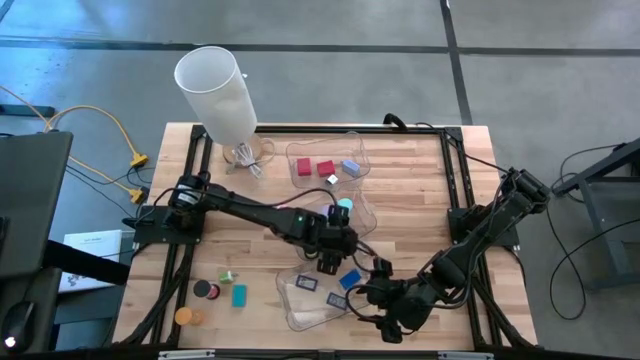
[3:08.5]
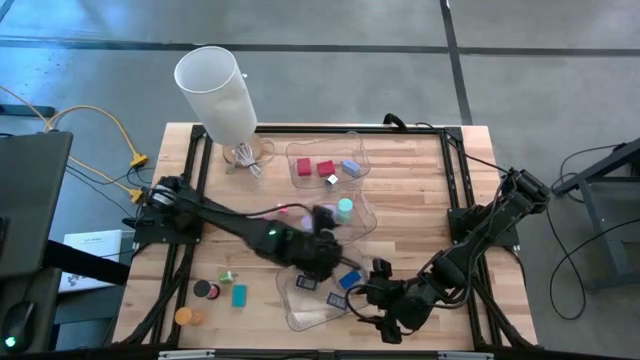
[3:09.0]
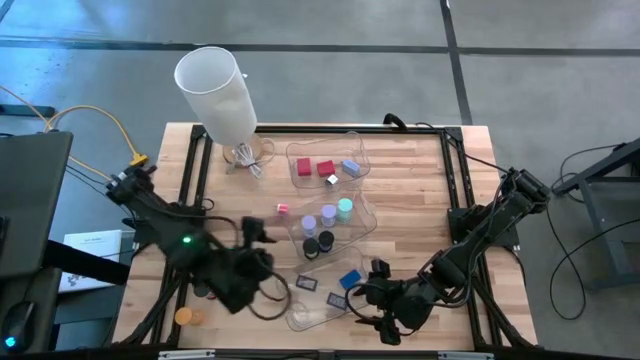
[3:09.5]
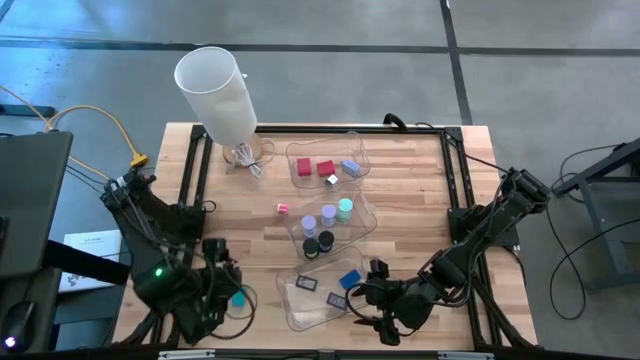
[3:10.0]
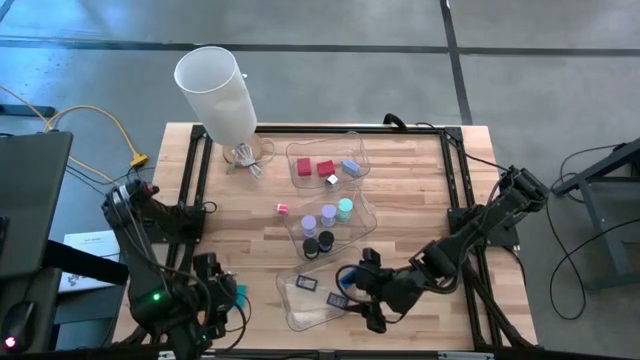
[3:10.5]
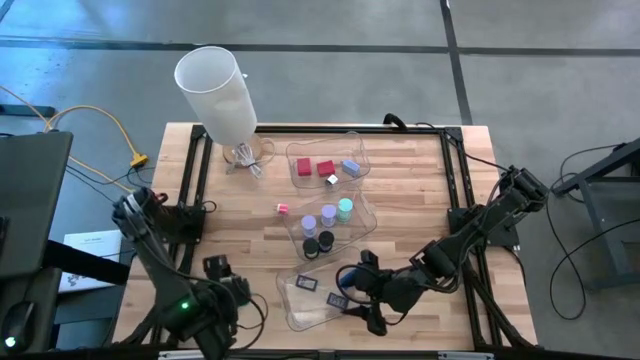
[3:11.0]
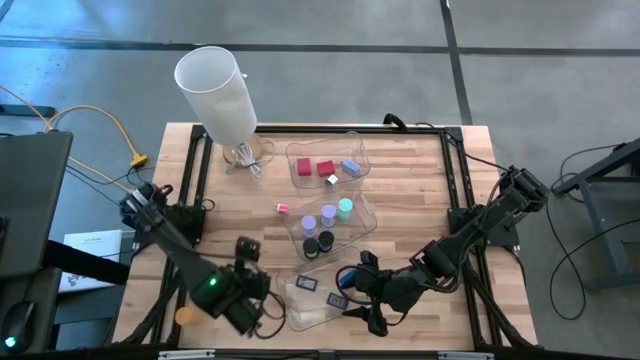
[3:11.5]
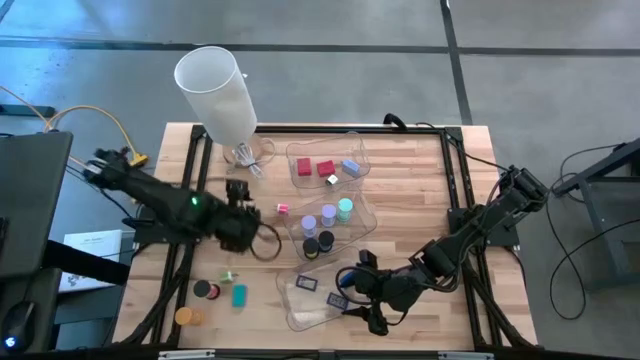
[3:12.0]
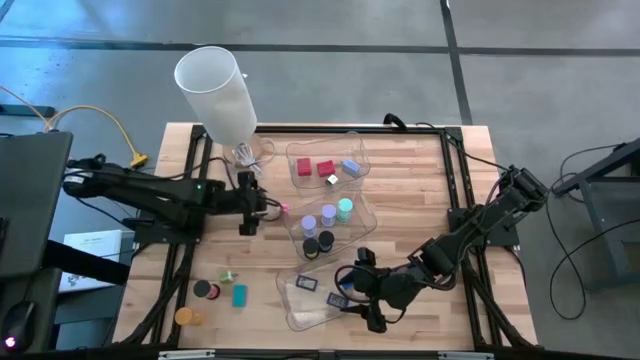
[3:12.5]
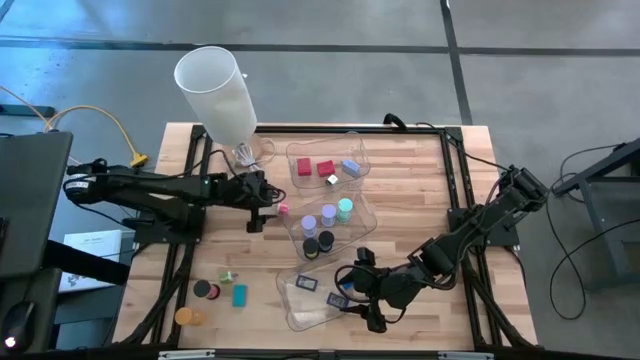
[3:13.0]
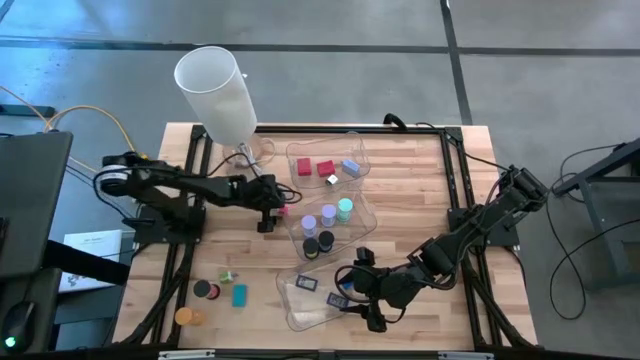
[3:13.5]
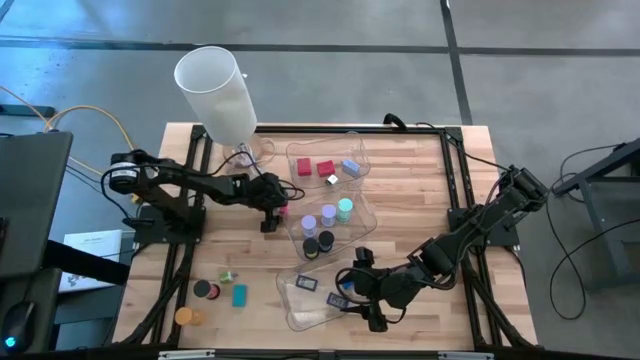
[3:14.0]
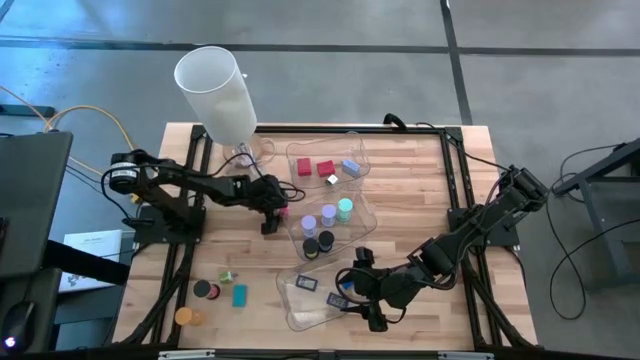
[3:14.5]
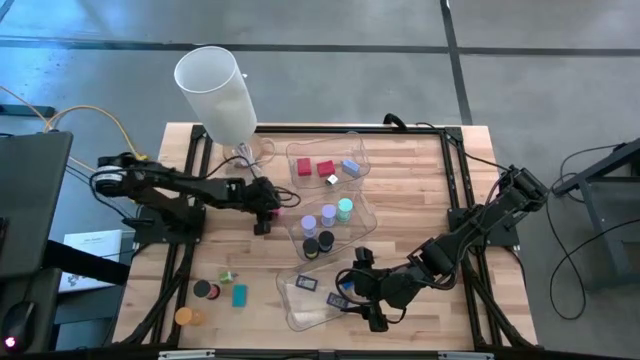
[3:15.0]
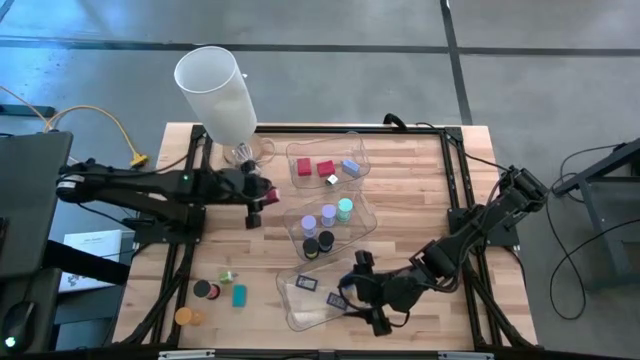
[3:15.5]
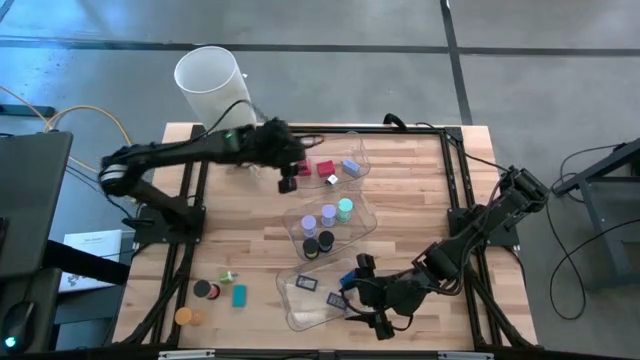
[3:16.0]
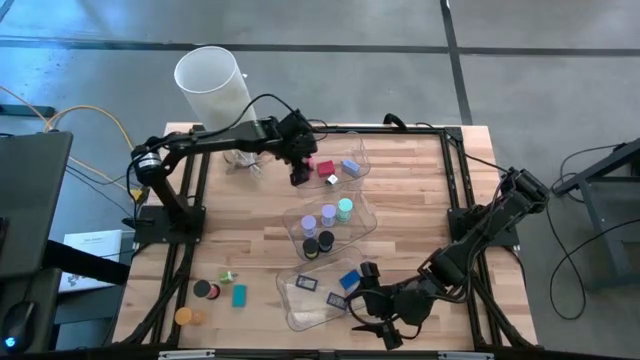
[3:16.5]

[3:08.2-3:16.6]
Task: Pick & Place Office items
Put the pink charger adapter into the top transparent bin

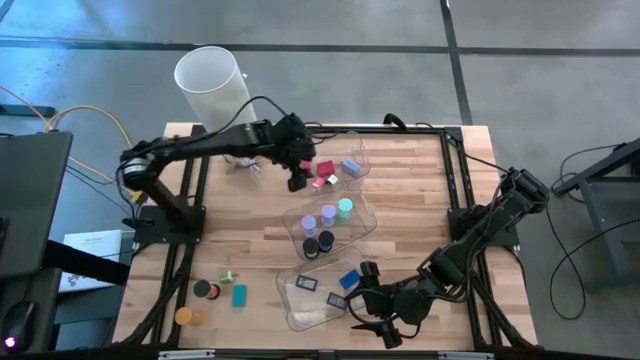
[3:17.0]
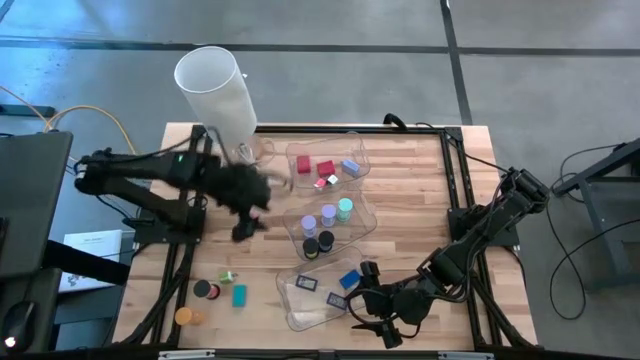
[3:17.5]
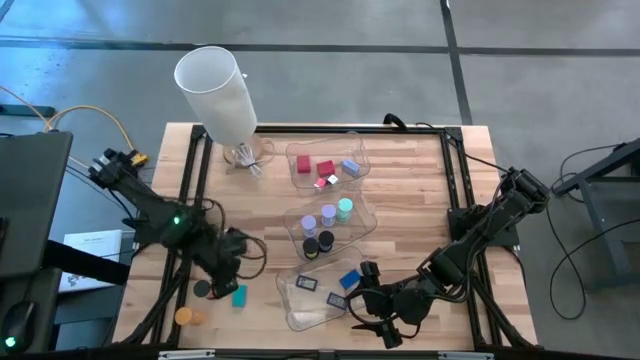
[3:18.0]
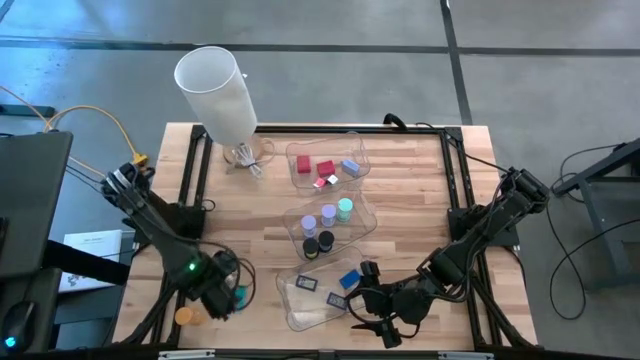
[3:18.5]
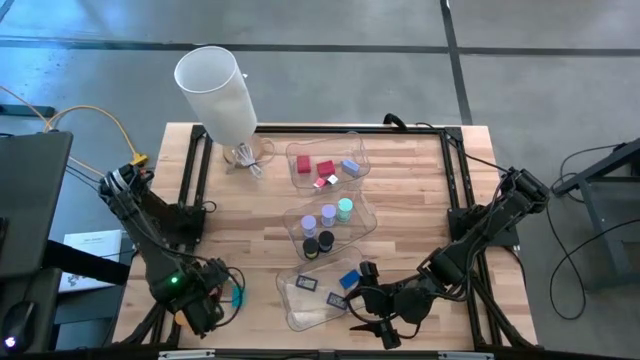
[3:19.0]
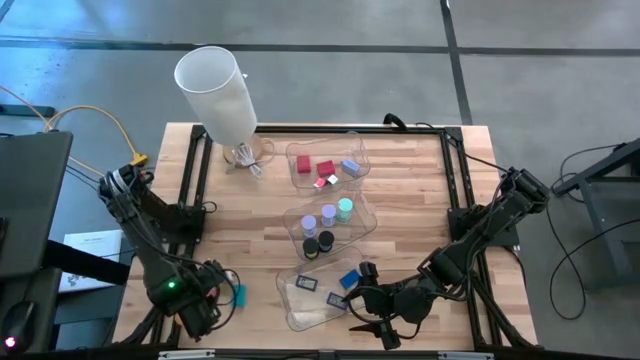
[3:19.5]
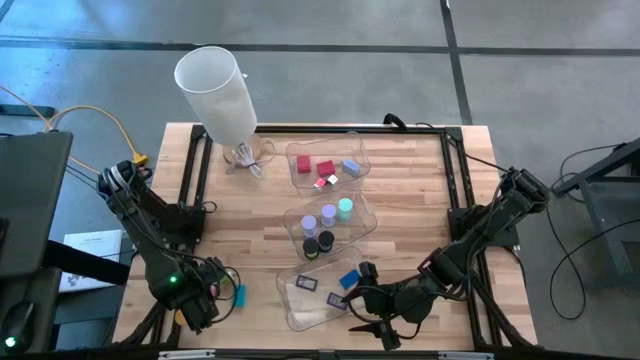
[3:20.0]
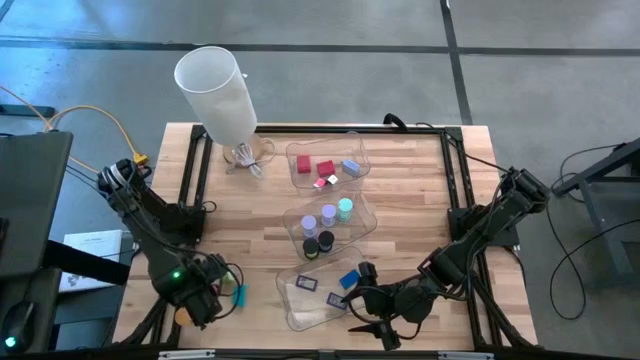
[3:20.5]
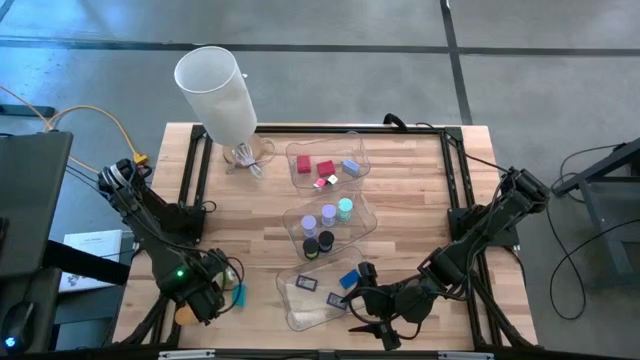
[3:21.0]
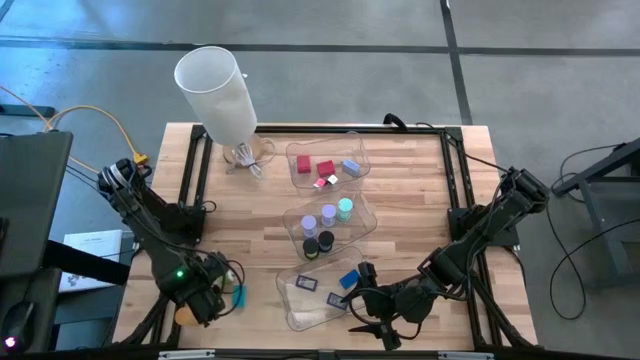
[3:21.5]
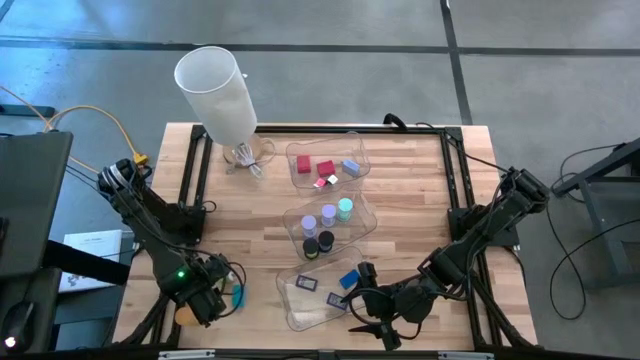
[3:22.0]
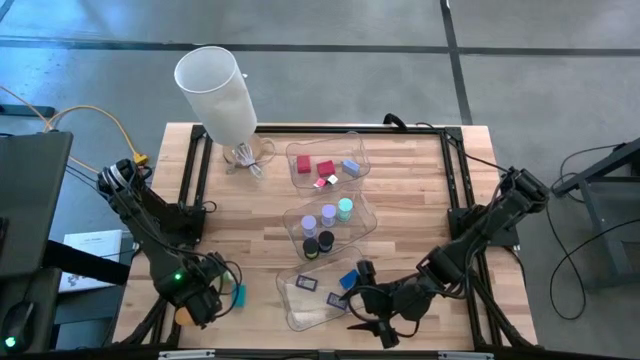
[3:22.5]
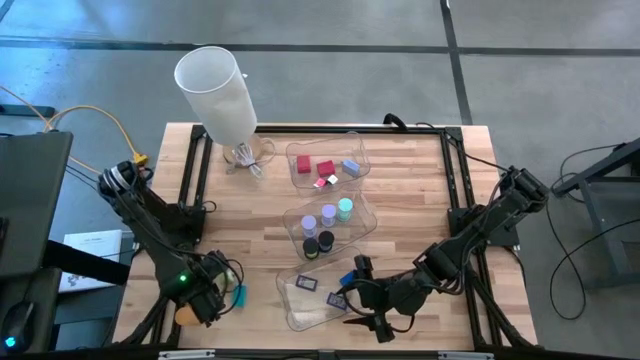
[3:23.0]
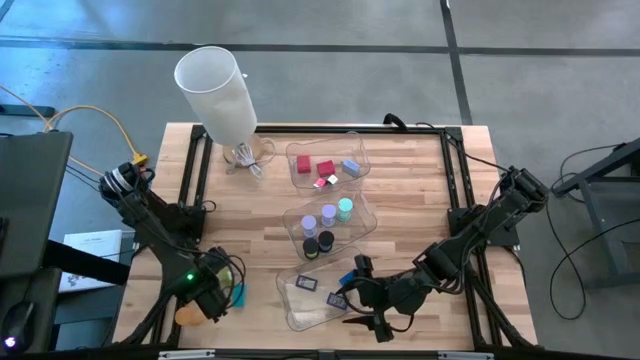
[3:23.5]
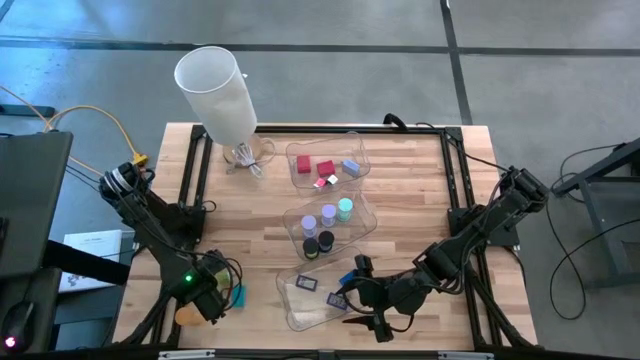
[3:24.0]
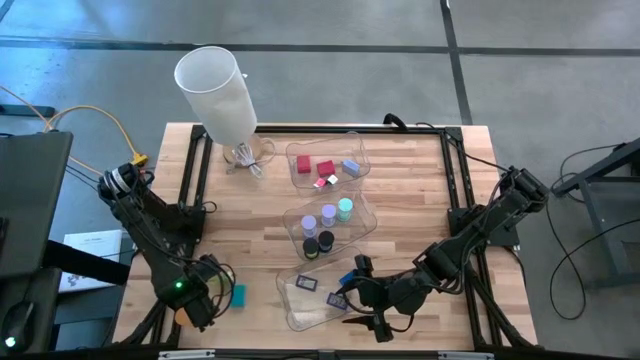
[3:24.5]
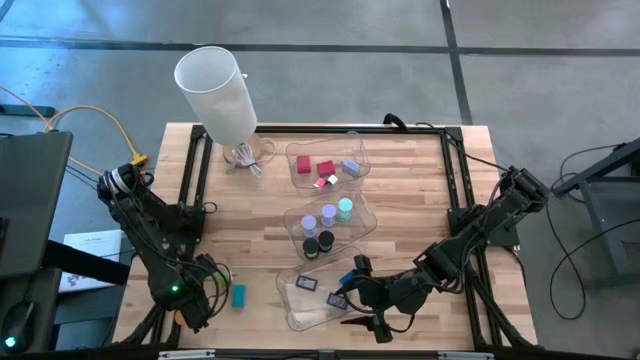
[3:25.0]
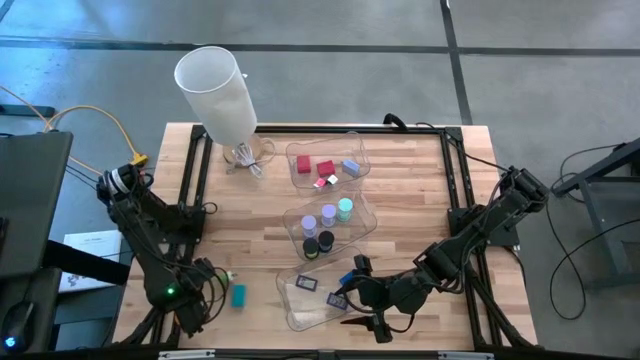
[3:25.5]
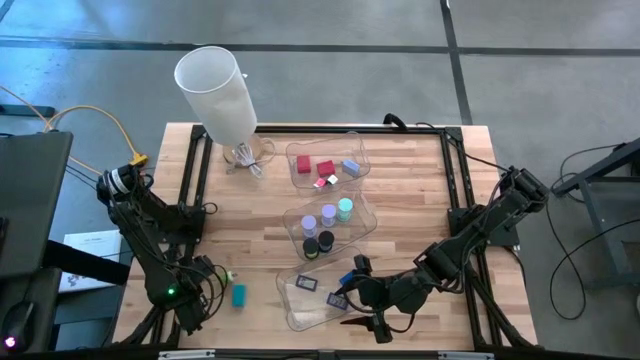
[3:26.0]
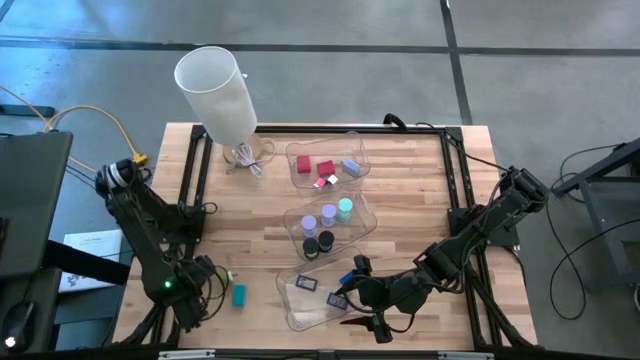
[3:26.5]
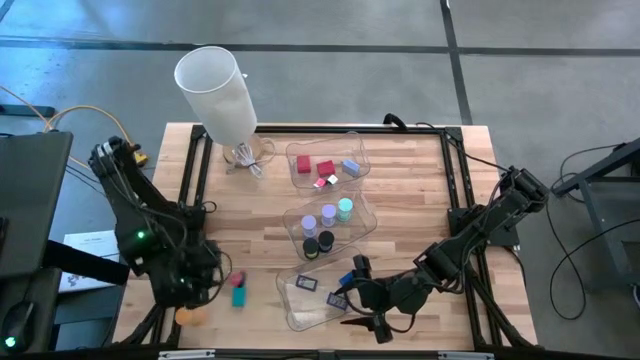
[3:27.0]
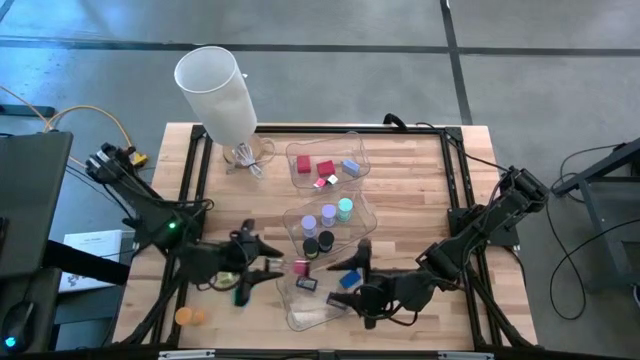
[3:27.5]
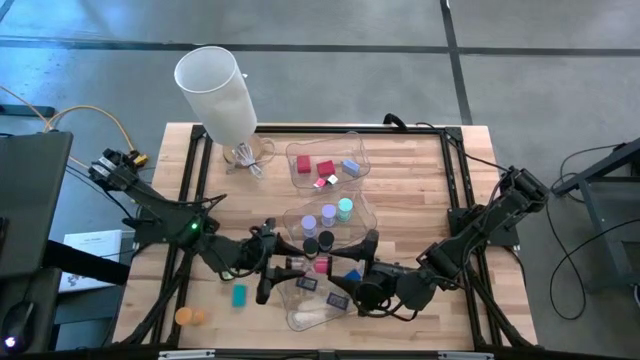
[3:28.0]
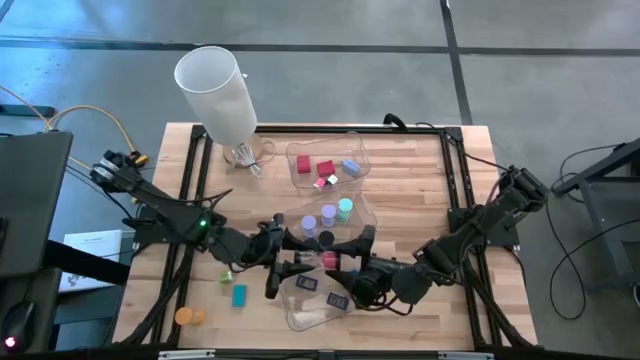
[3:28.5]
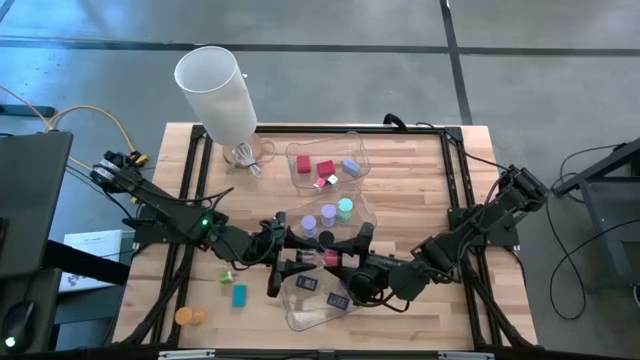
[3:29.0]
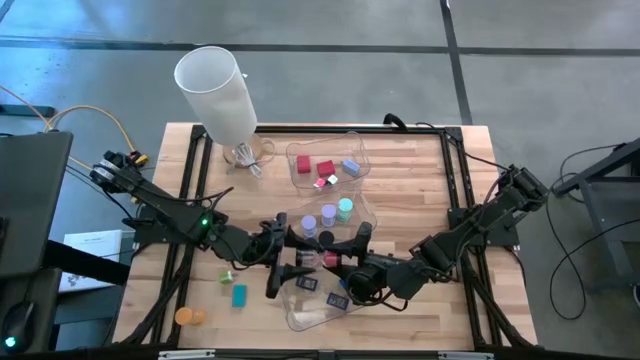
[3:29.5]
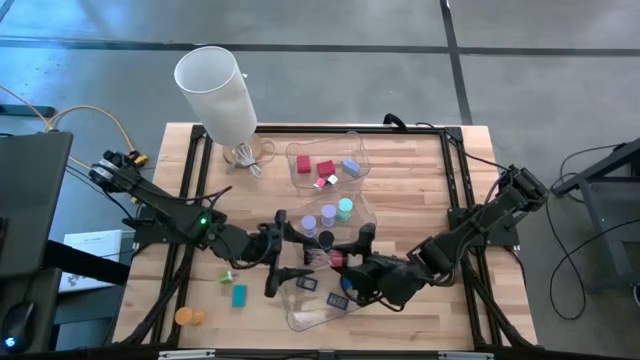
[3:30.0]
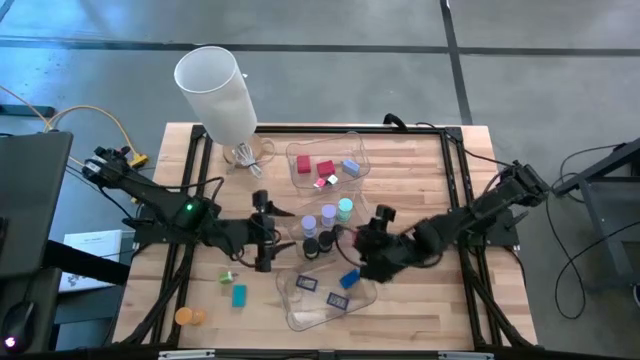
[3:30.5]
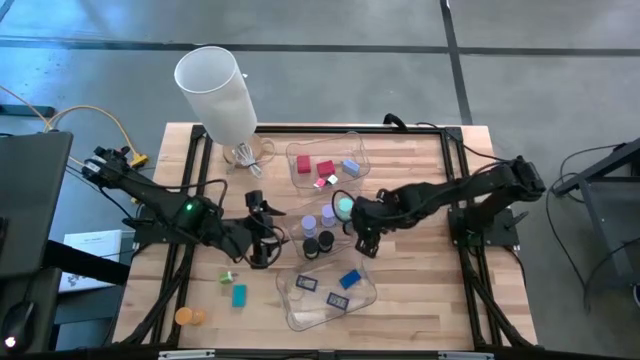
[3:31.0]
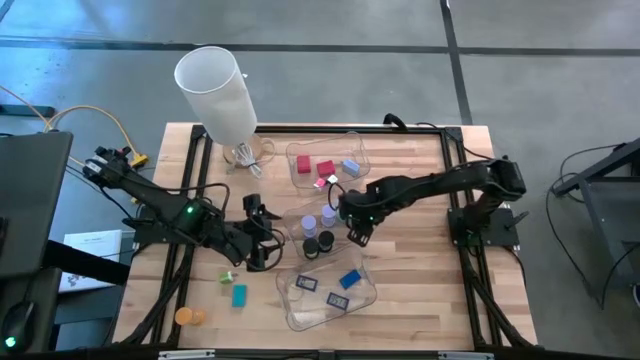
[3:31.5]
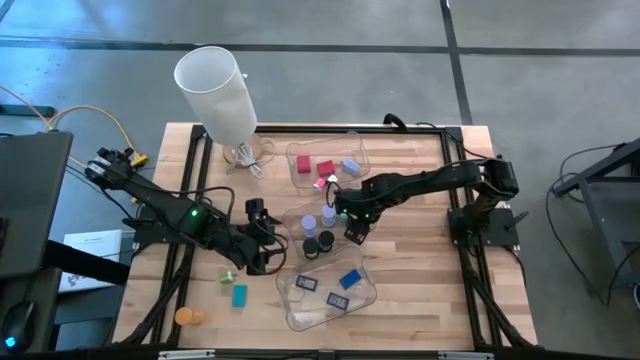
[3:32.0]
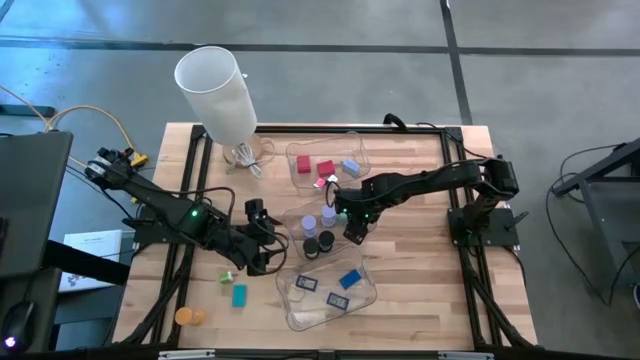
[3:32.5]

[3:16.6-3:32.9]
Put the pink hourglass into the middle transparent bin
